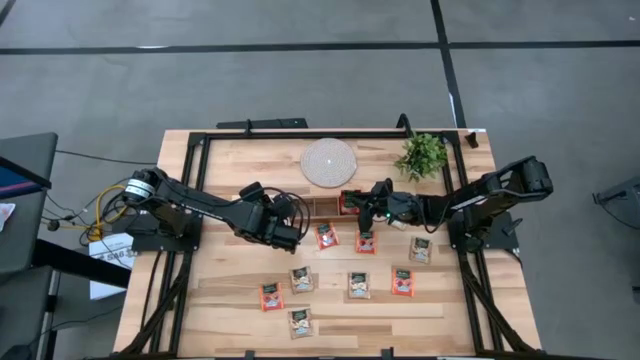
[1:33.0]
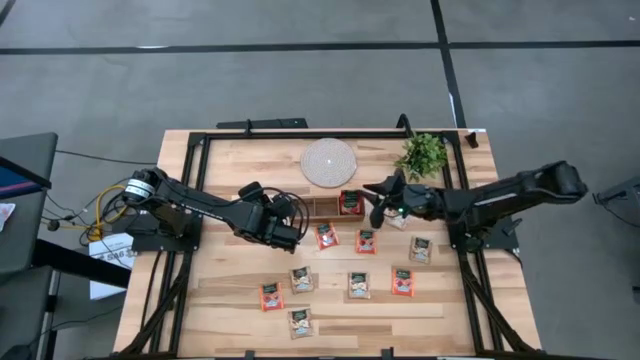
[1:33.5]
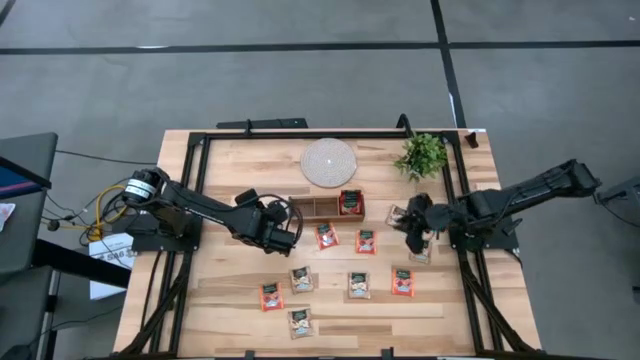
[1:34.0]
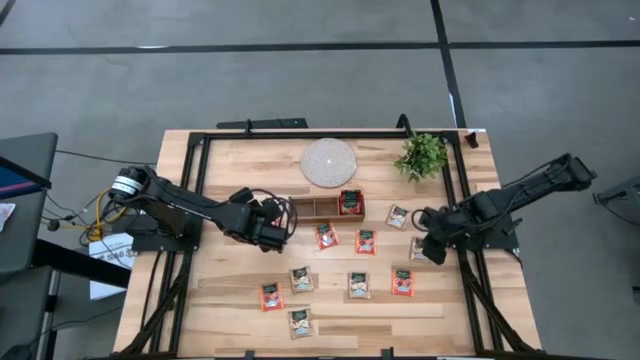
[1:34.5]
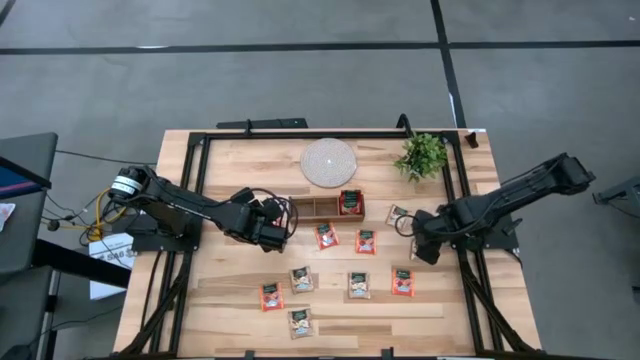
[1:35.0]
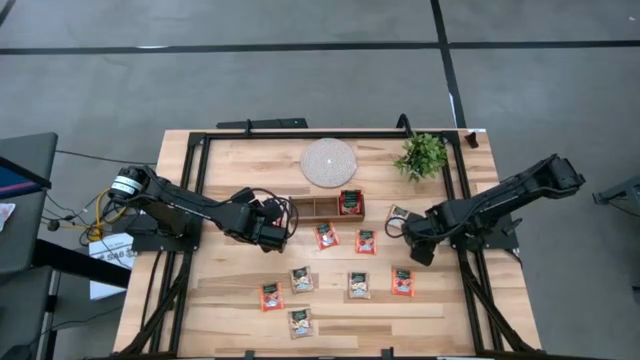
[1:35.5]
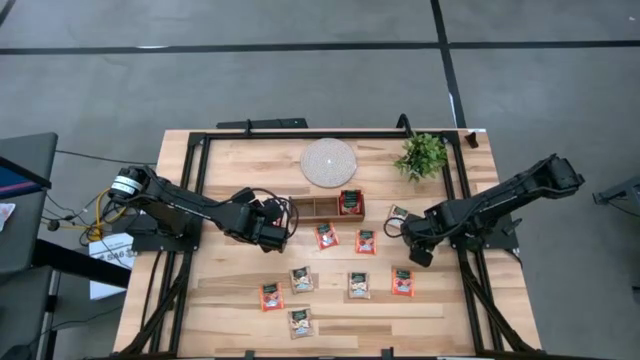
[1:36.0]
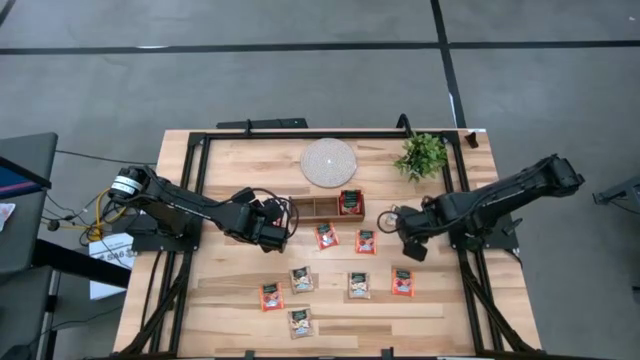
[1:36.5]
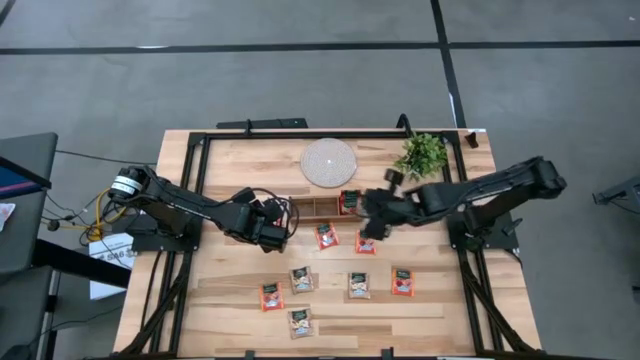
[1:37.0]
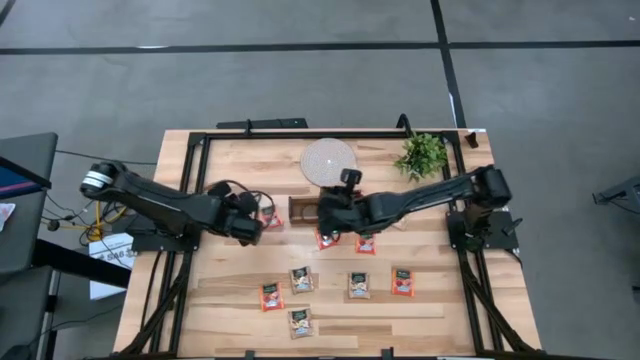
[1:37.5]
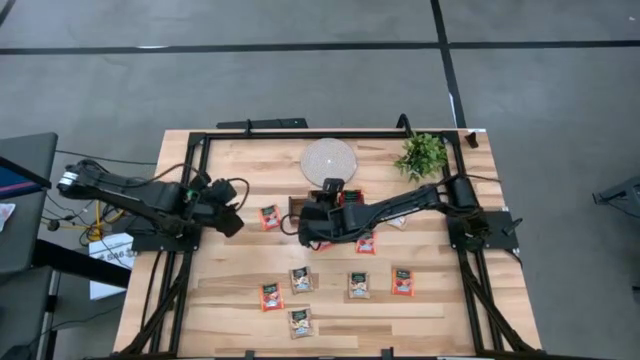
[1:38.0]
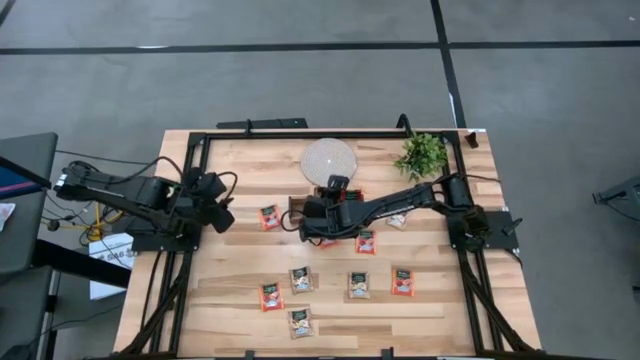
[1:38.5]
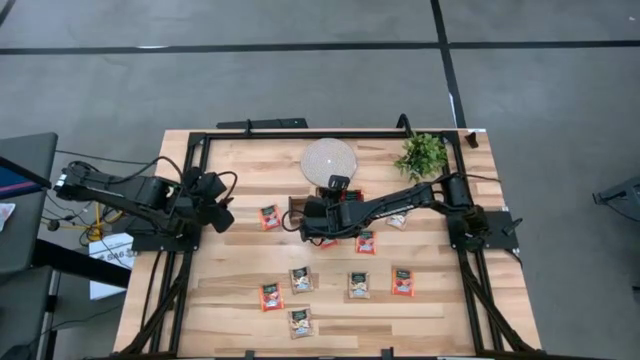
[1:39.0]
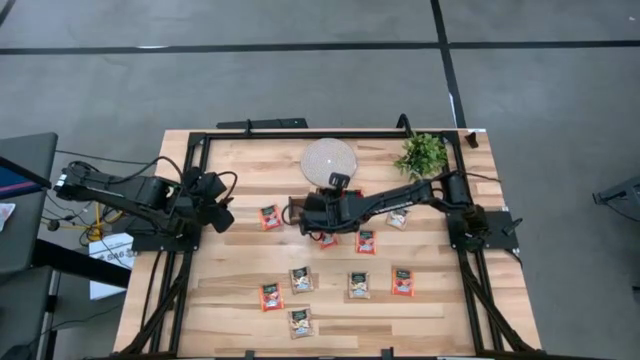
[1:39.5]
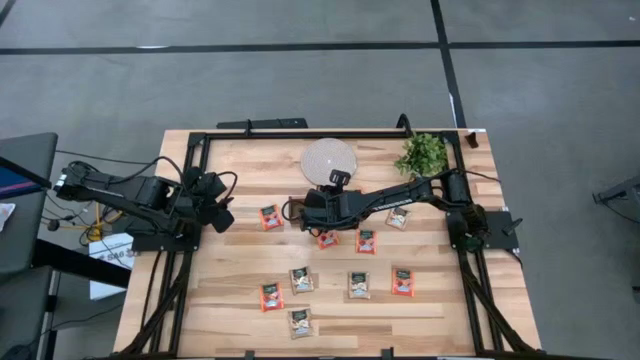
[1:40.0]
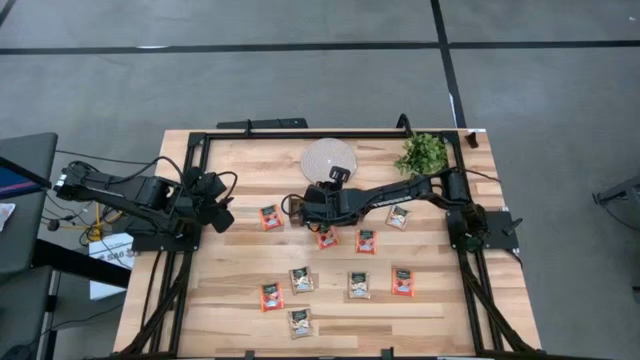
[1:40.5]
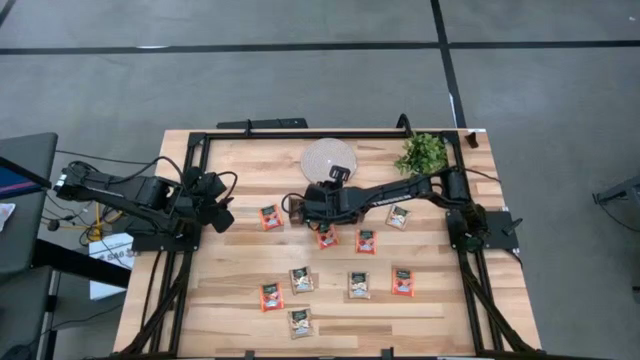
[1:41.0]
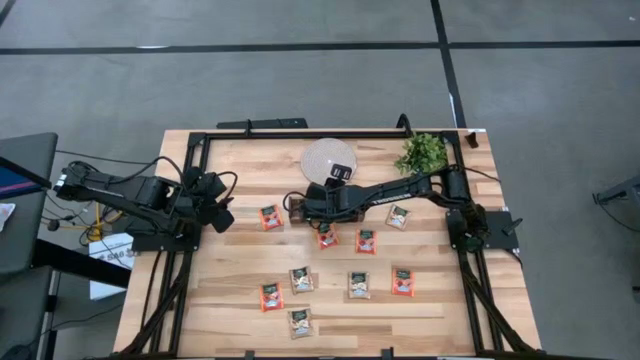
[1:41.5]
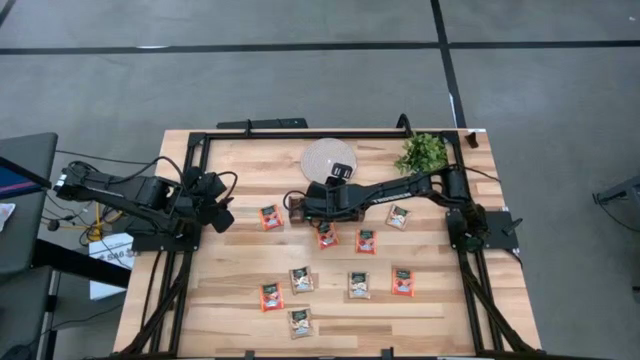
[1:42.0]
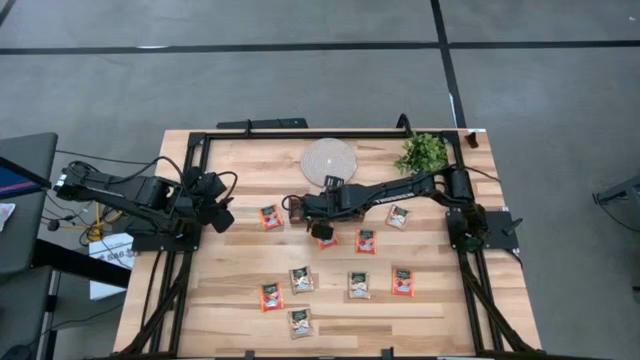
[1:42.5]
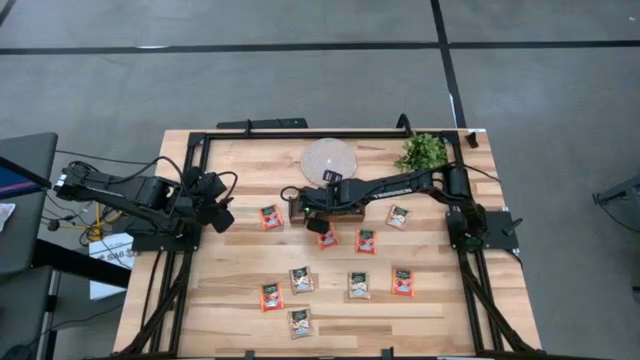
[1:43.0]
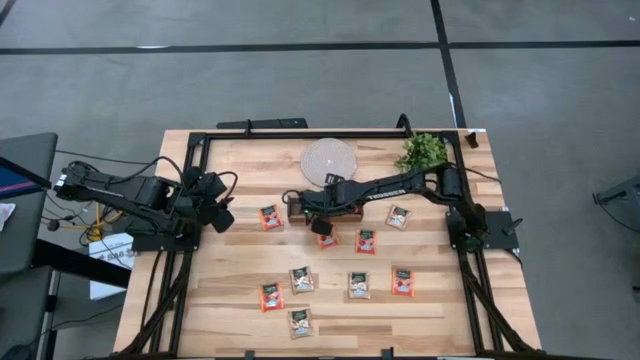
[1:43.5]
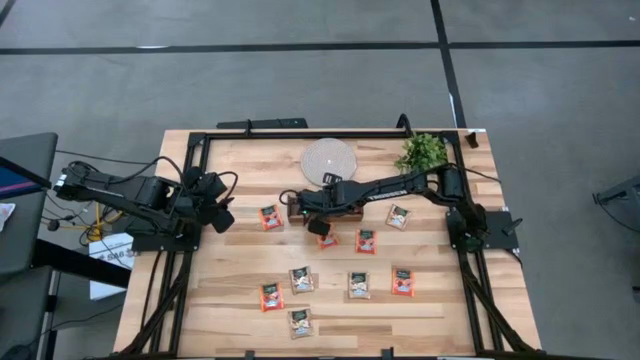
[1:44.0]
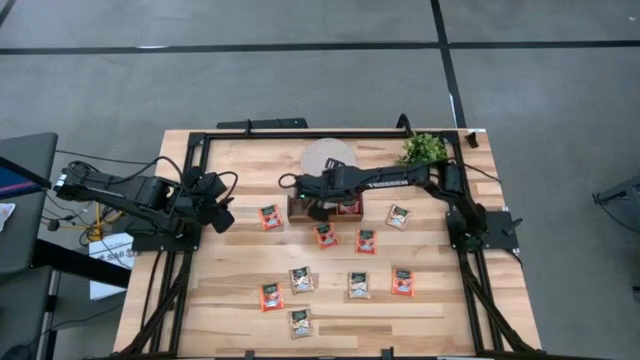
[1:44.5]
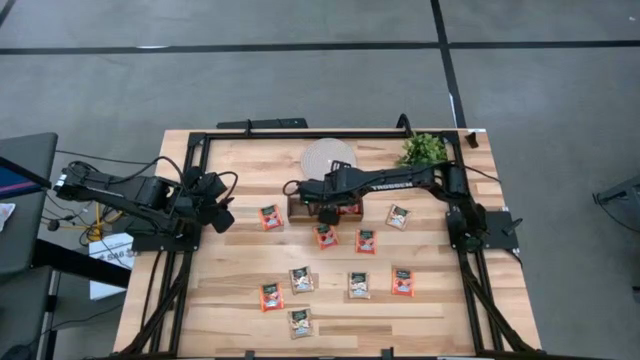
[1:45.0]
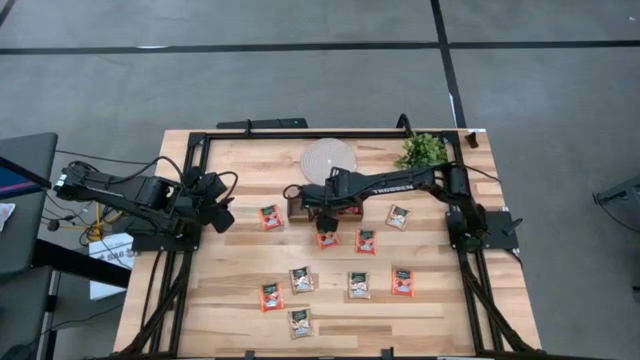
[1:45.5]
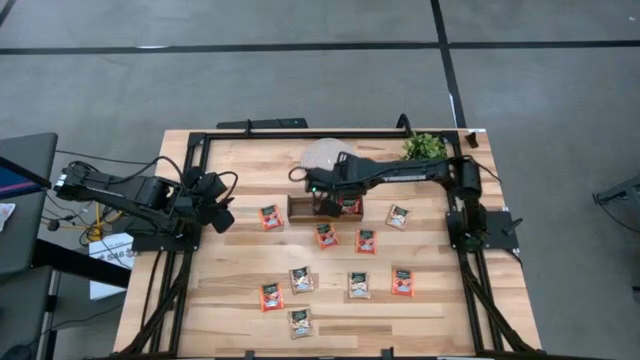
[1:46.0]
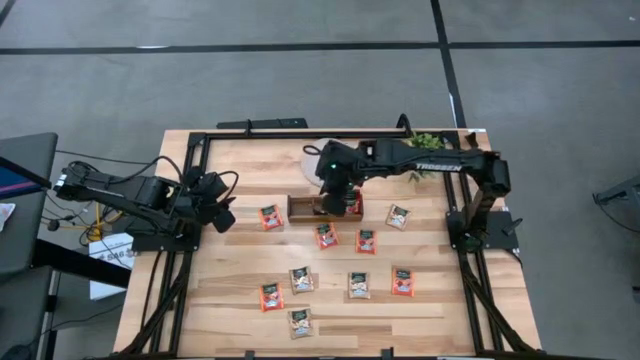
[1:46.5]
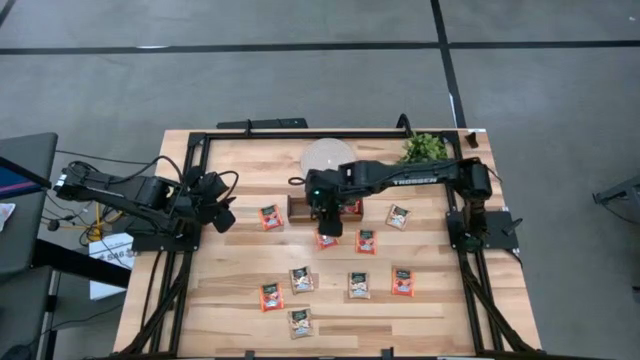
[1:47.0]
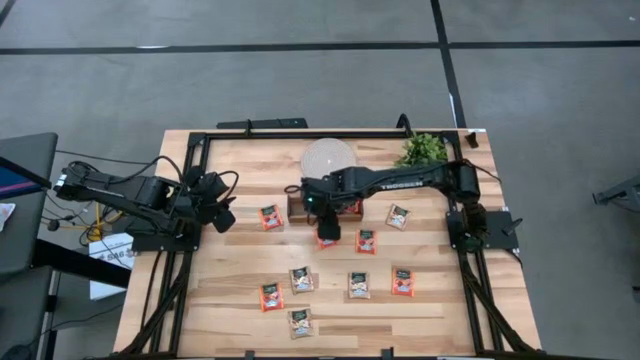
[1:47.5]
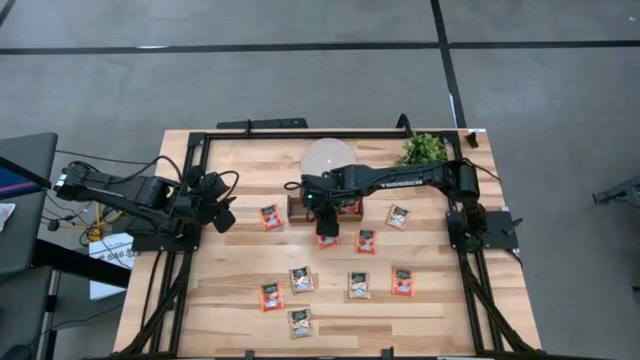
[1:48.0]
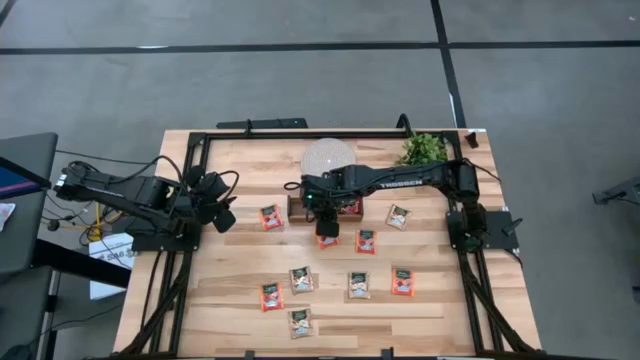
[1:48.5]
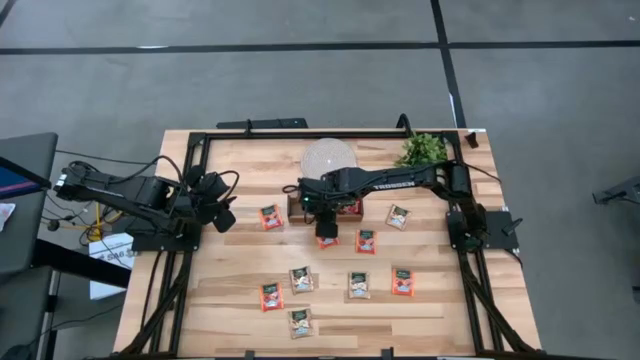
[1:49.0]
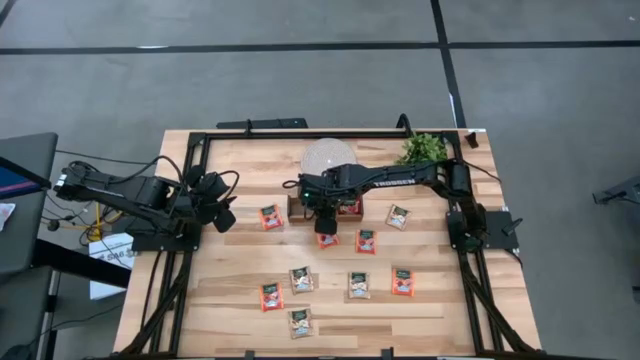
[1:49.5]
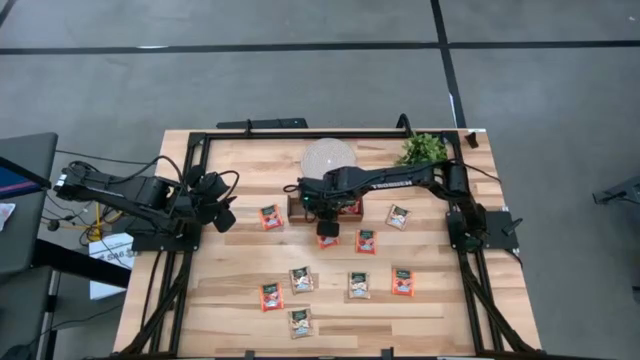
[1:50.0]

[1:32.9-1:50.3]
Task: Pick & Place Tea
Put the brown tea bag into the middle slot of the wooden organizer

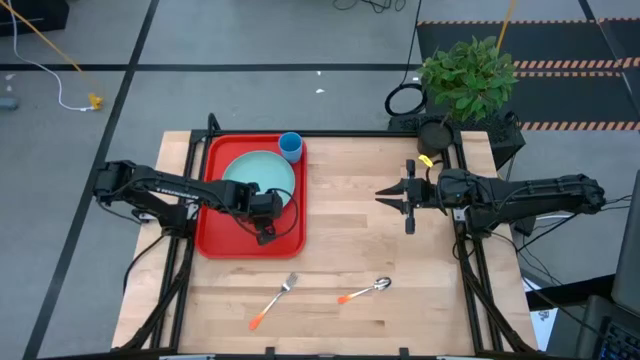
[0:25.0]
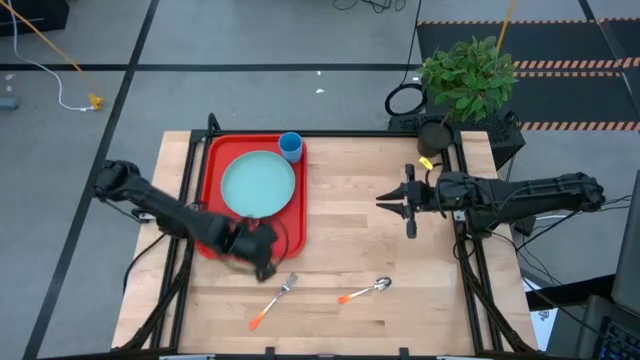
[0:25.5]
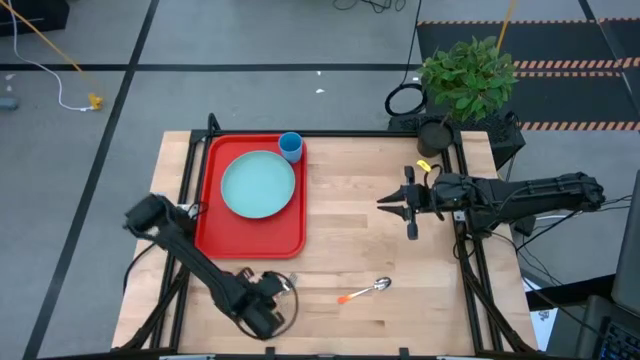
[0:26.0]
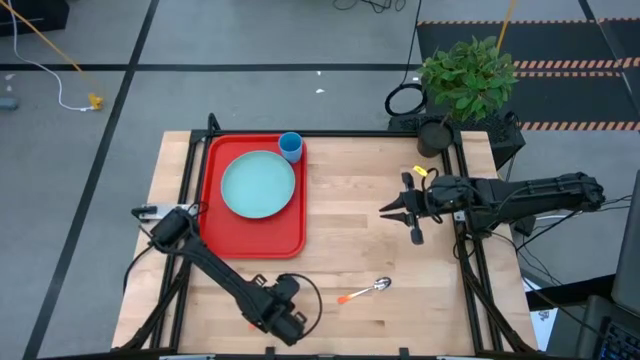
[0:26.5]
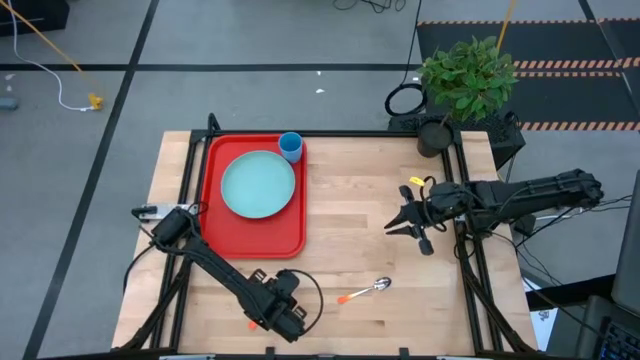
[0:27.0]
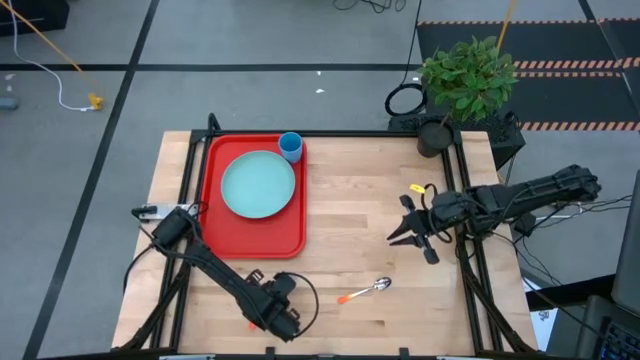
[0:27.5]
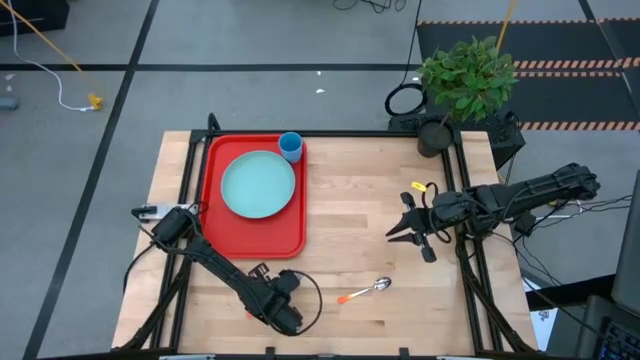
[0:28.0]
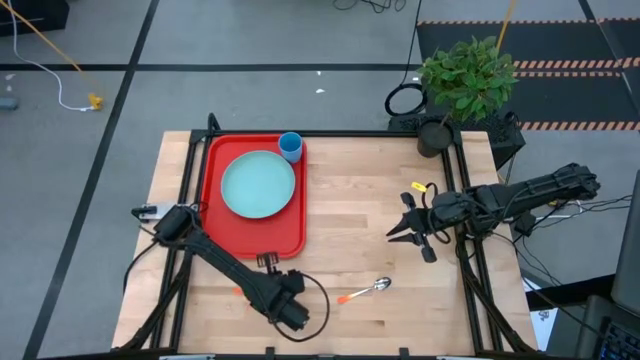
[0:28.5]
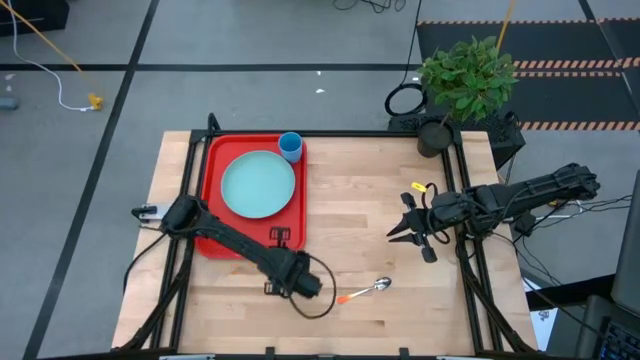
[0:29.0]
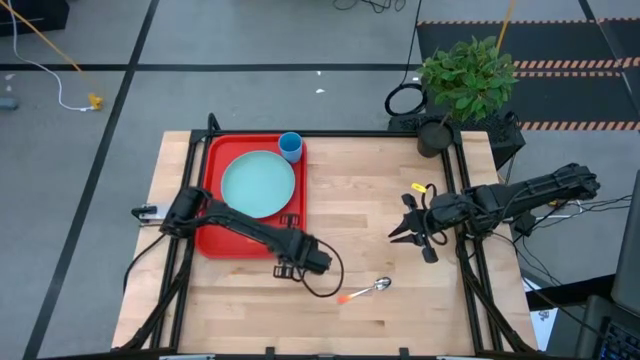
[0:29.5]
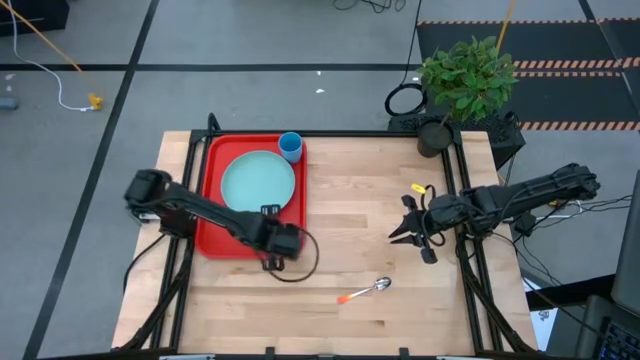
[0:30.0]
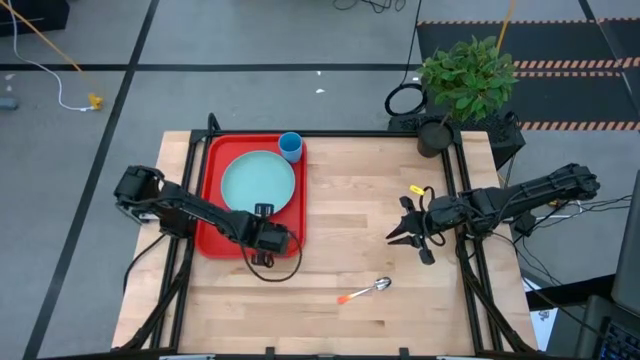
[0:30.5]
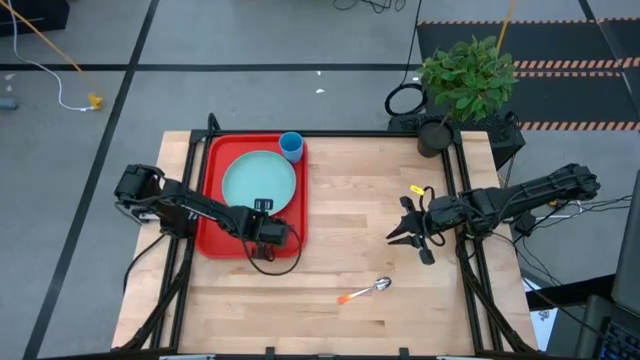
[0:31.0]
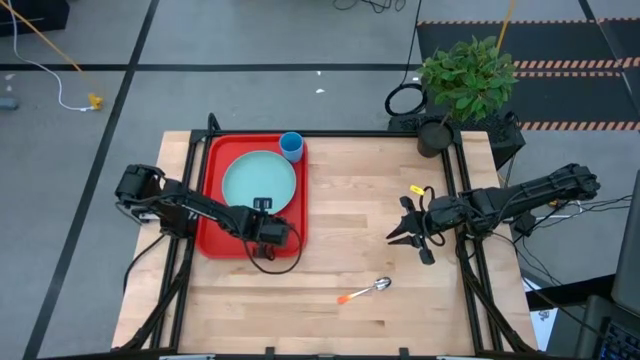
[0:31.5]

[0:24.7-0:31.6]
Task: Pick and place plate/cup/fork/spoon on tray
Put the orange fork on the red serving tray to the right of the light green plate
